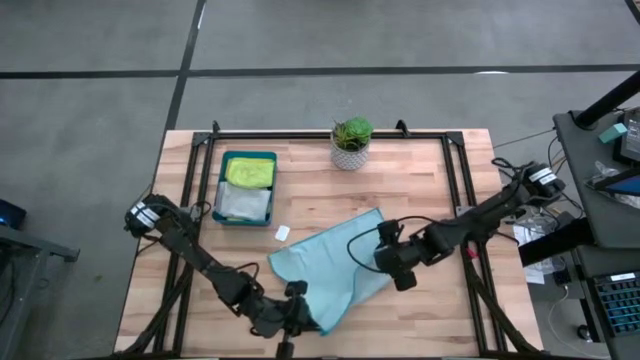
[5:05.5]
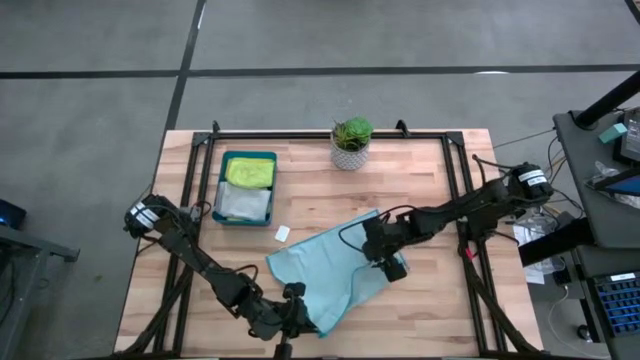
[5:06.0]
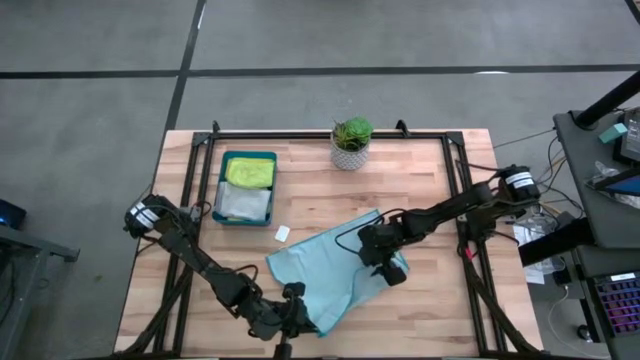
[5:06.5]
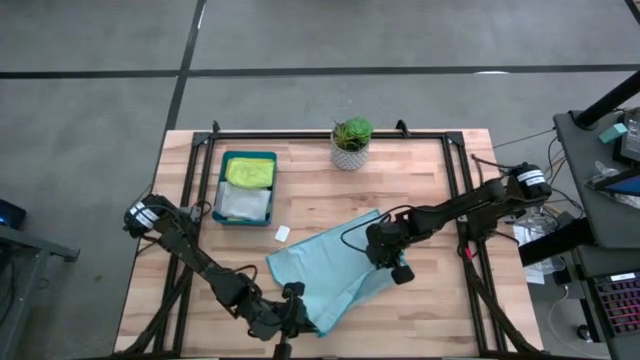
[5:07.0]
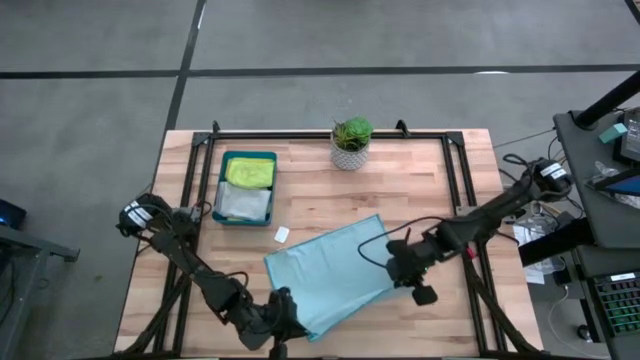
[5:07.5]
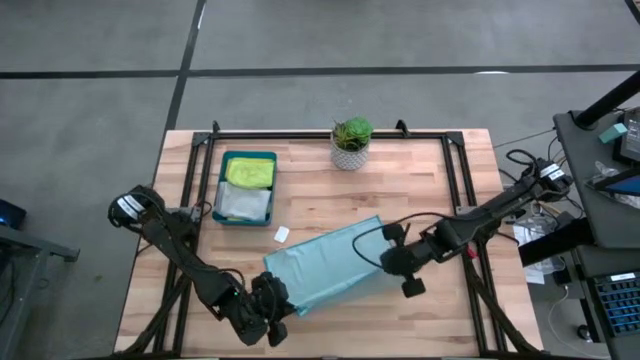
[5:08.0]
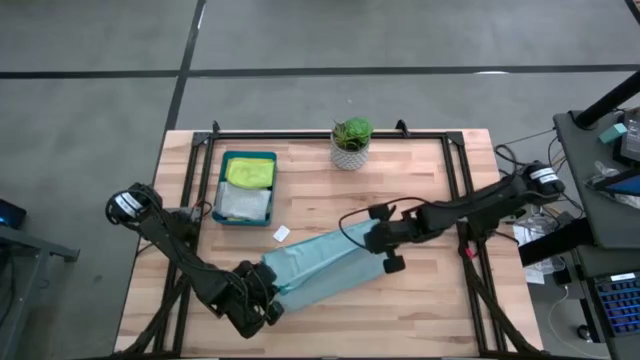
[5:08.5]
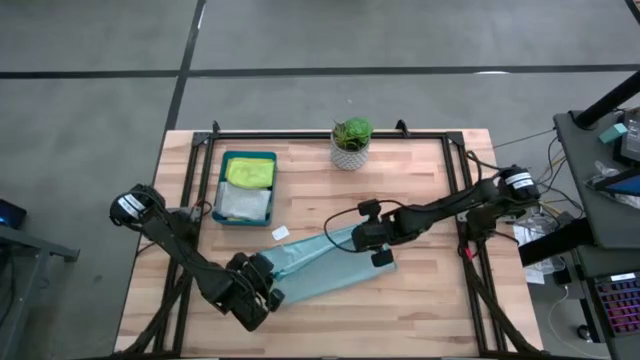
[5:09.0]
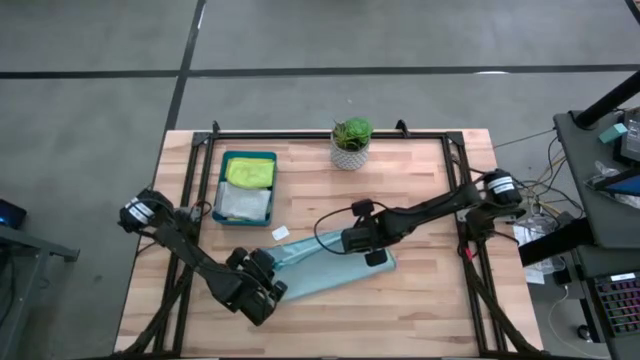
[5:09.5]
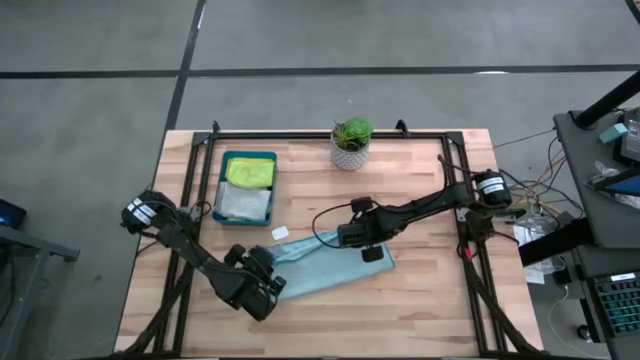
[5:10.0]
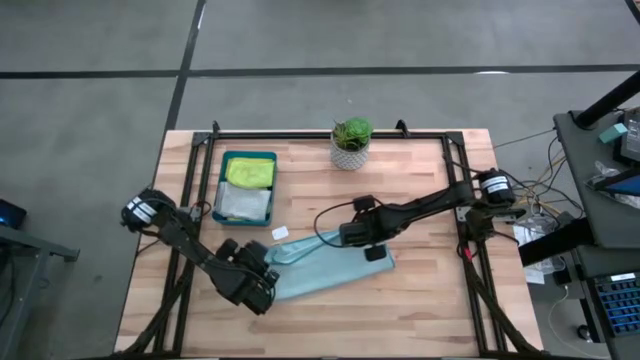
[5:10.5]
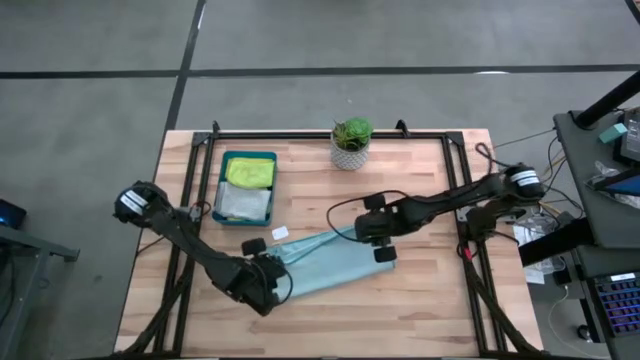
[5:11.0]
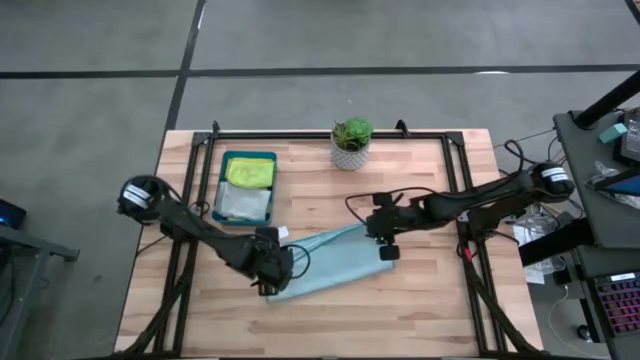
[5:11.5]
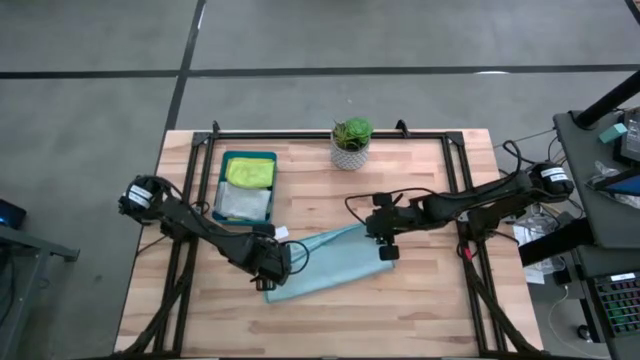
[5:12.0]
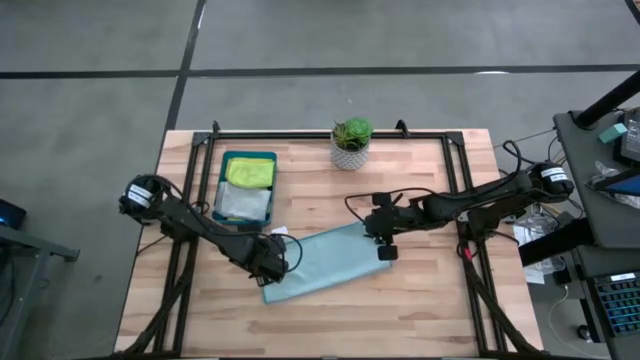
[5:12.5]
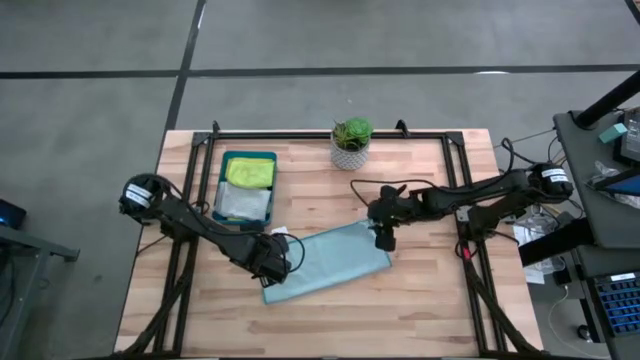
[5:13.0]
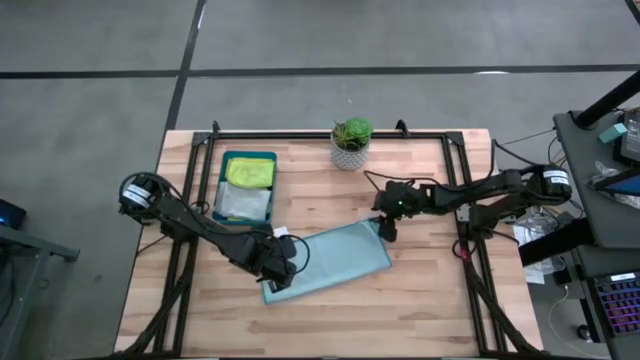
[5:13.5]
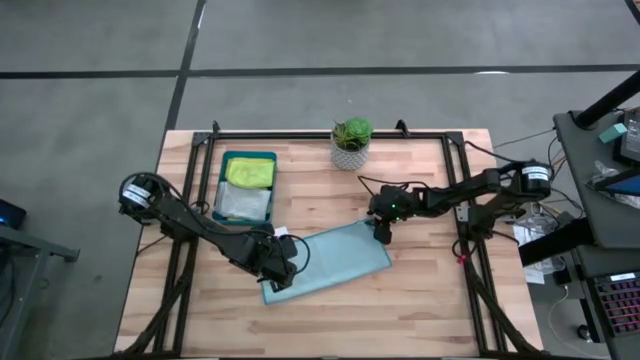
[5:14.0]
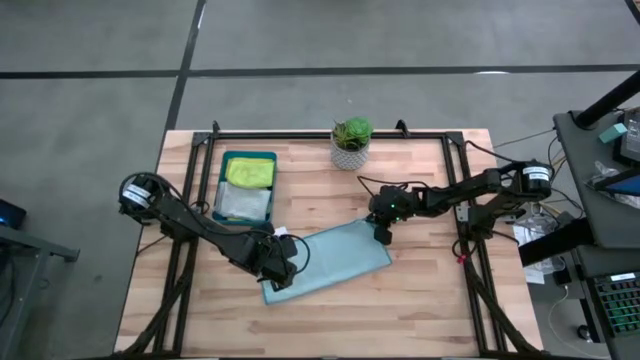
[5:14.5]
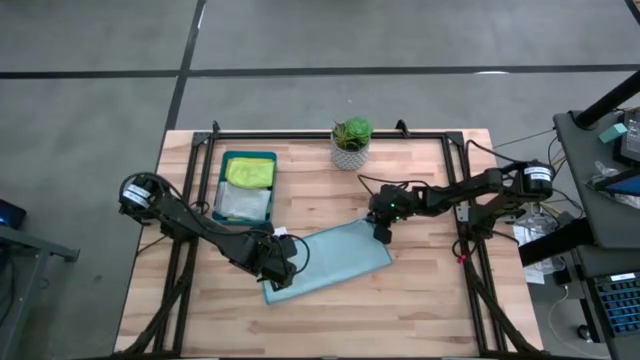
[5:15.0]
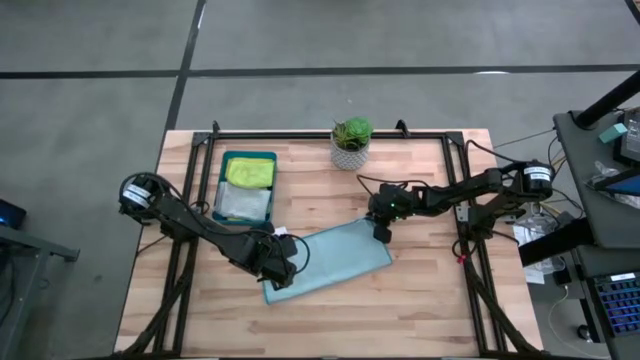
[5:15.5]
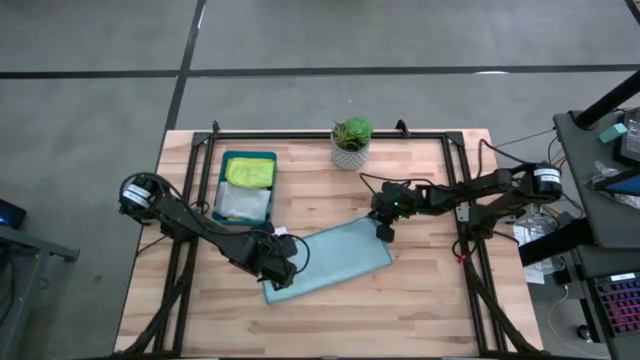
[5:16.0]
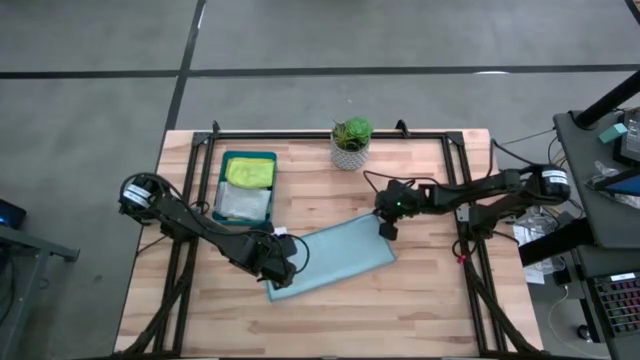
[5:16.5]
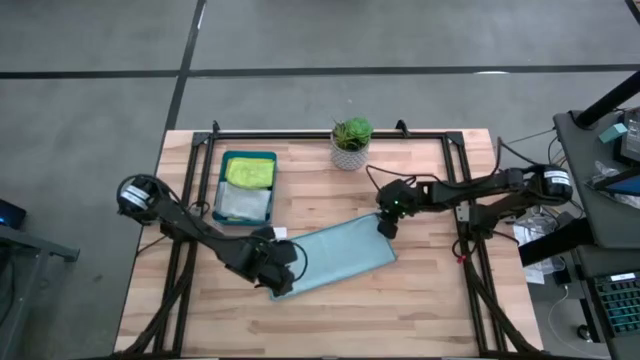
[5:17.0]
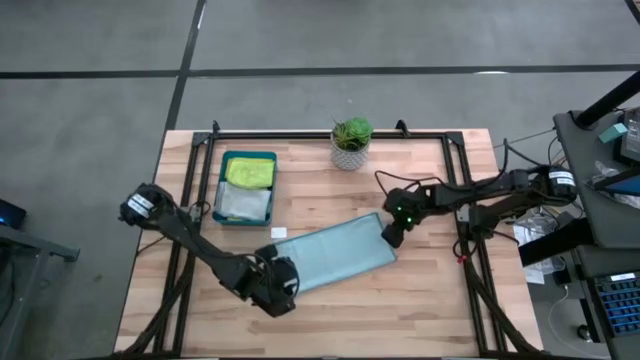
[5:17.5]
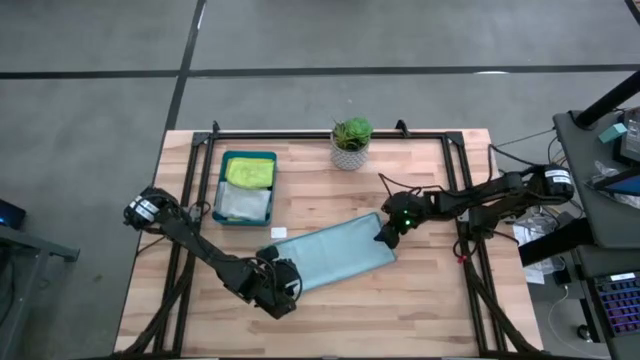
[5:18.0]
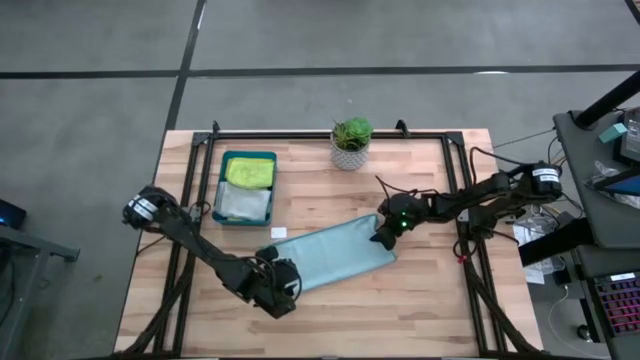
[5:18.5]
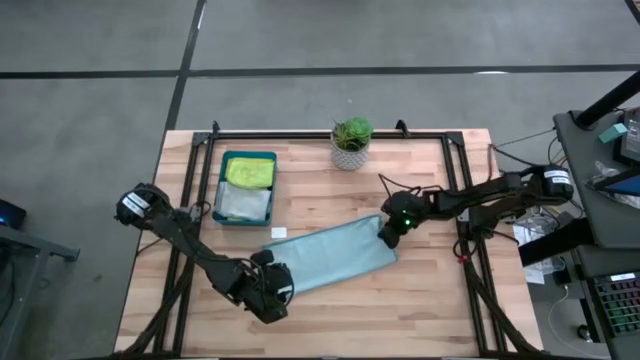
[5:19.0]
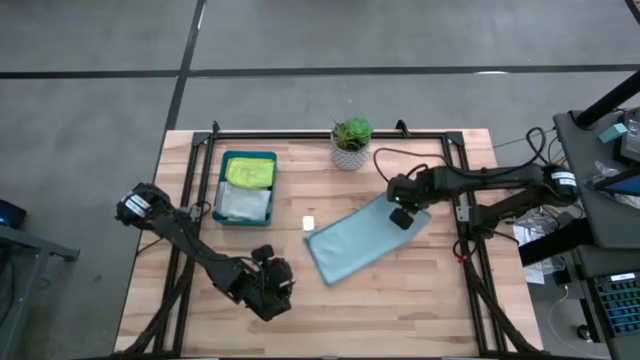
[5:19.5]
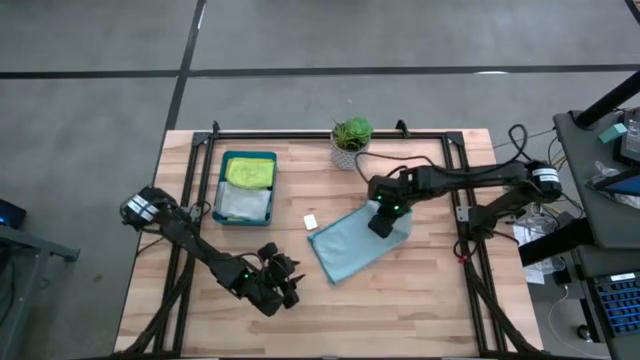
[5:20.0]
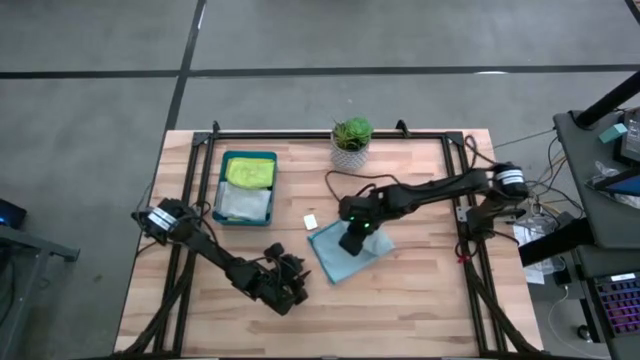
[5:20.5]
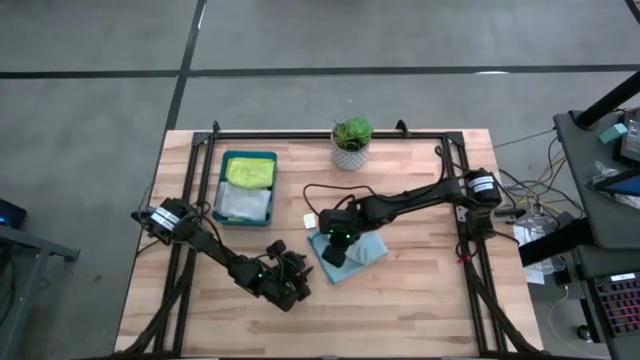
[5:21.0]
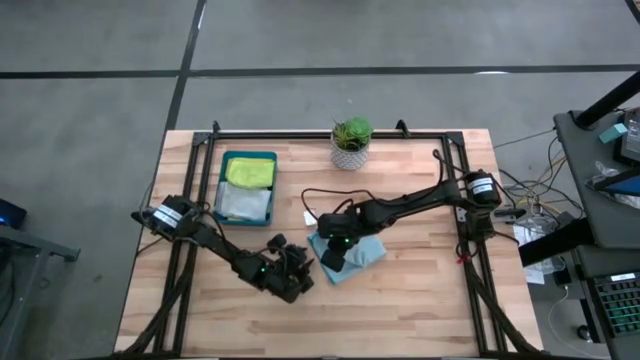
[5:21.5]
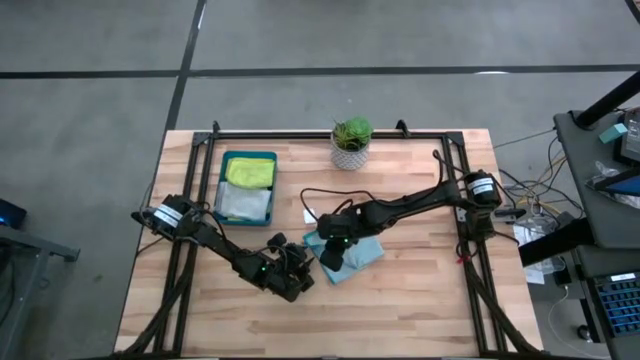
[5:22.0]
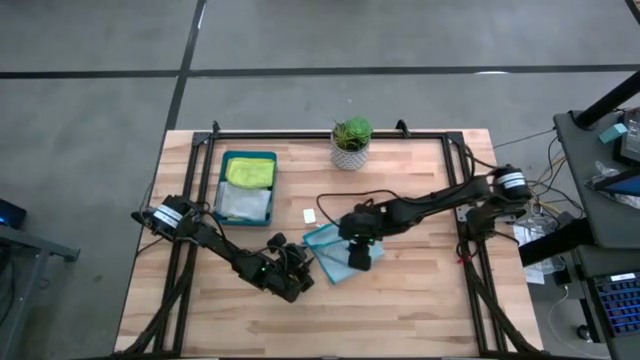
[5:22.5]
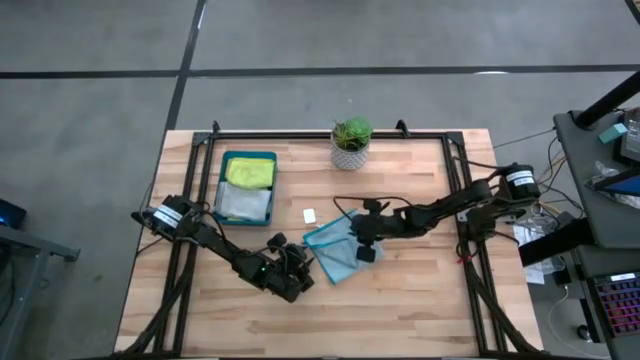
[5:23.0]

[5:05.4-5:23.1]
Task: Fold microfiber towels
Fold the blue towel

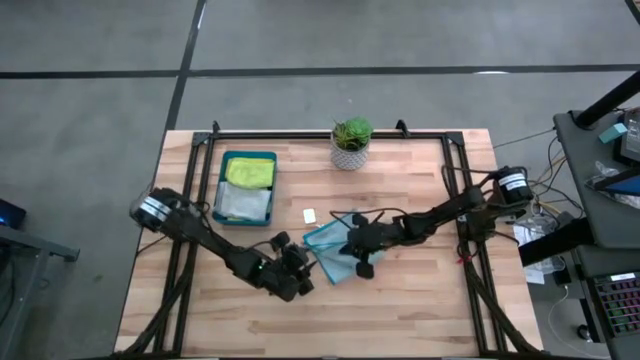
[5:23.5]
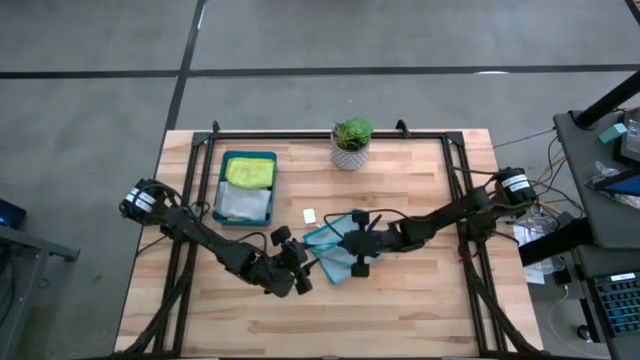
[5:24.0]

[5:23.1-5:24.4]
Fold the blue towel

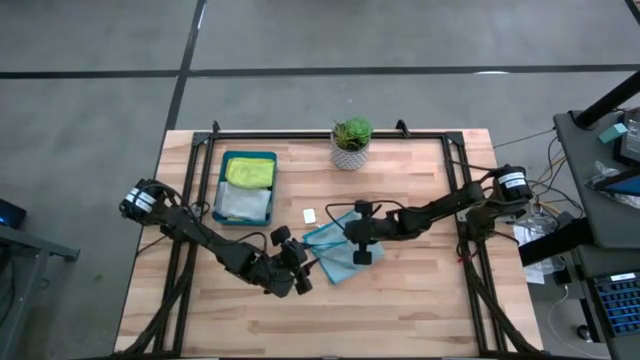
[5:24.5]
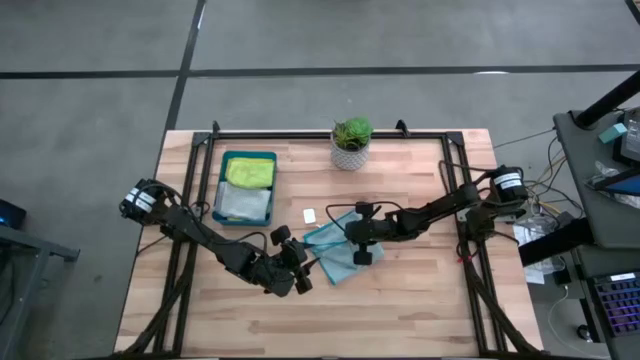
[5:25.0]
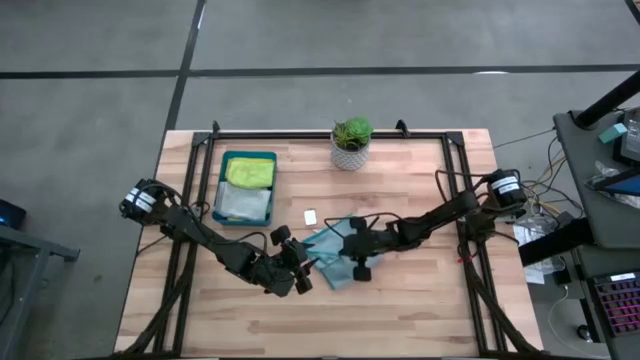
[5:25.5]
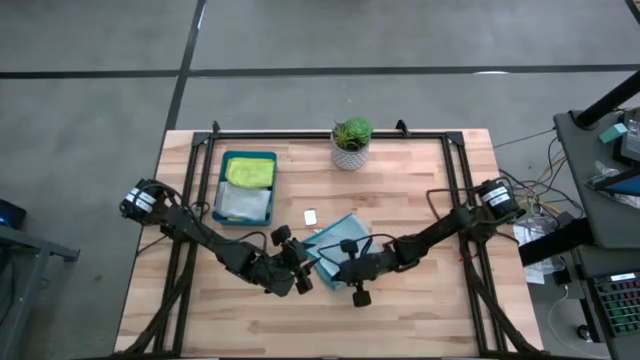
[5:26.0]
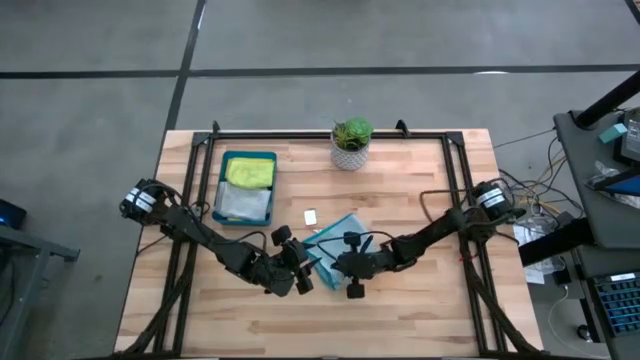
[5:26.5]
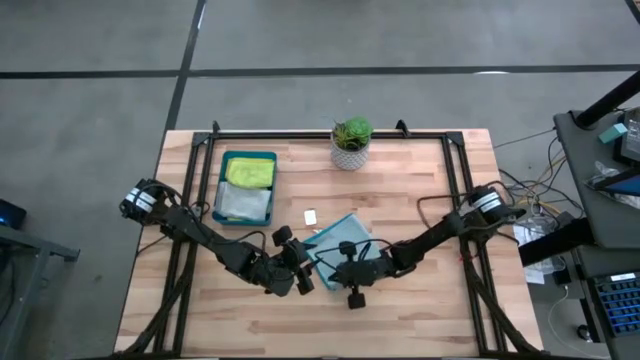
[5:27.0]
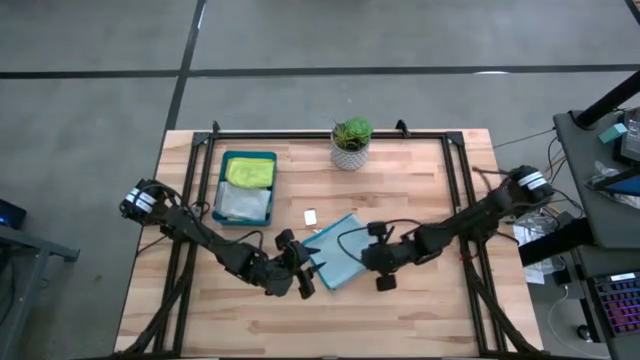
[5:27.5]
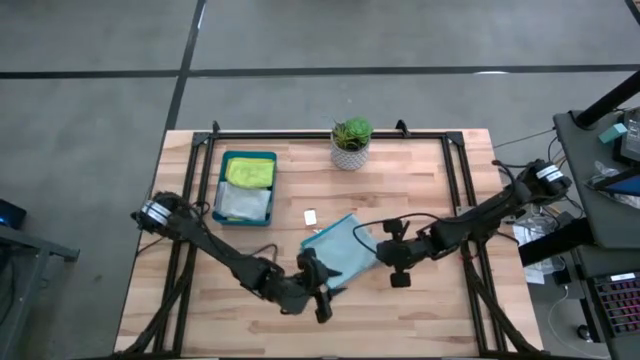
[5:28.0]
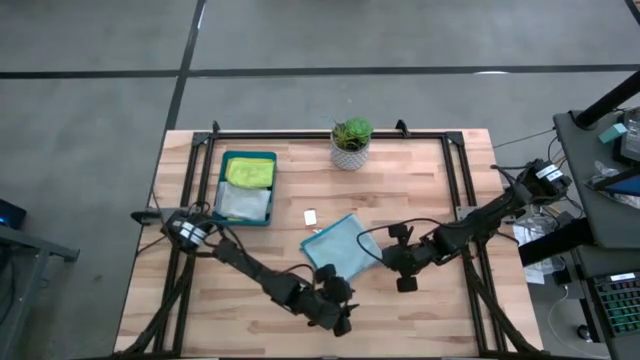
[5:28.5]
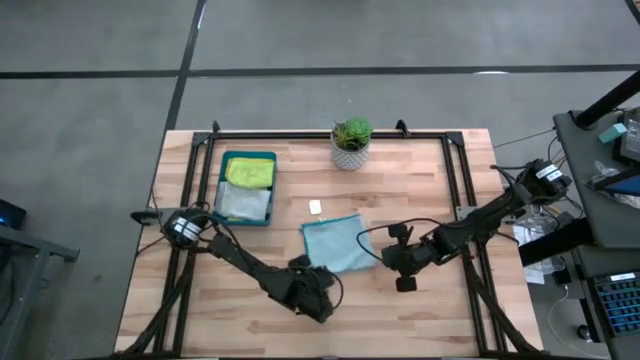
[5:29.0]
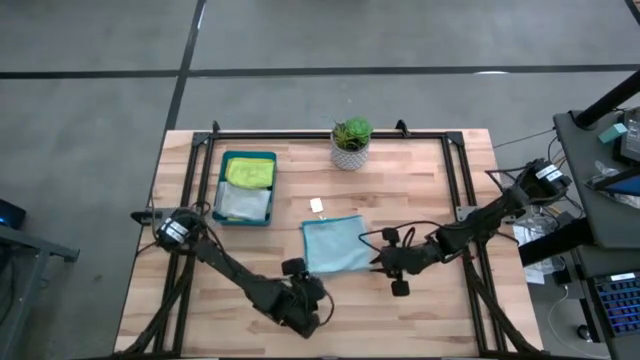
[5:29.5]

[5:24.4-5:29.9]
Fold the blue towel
